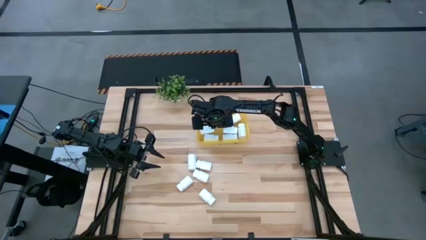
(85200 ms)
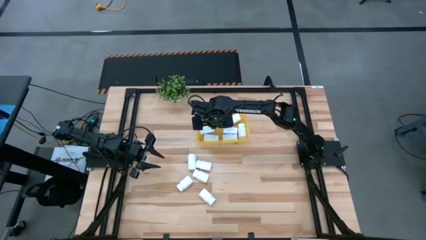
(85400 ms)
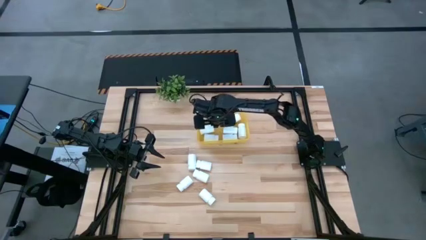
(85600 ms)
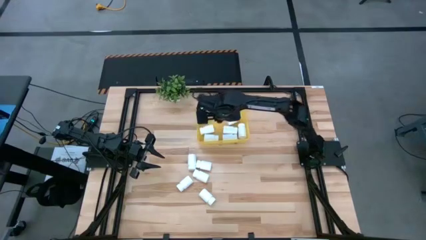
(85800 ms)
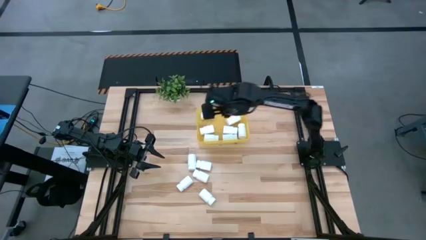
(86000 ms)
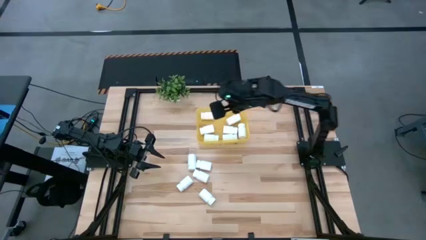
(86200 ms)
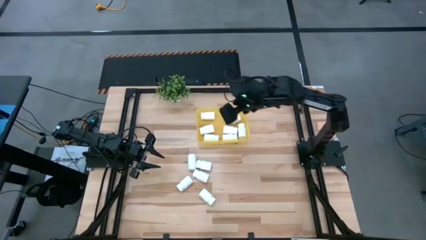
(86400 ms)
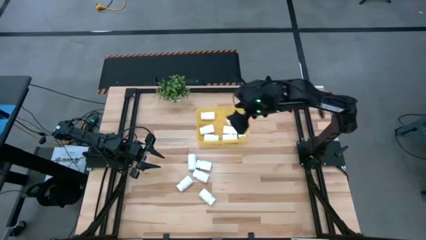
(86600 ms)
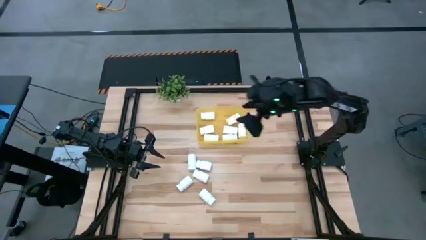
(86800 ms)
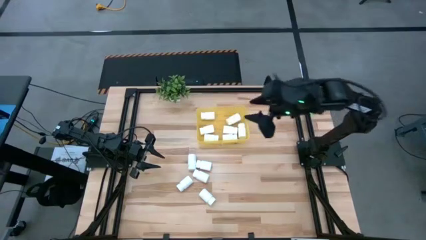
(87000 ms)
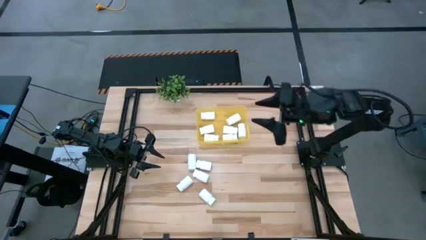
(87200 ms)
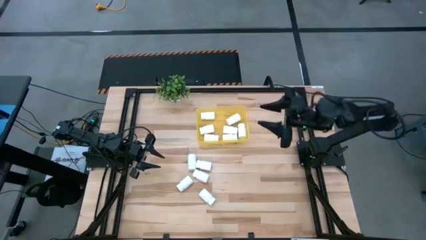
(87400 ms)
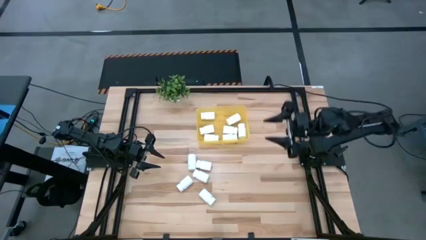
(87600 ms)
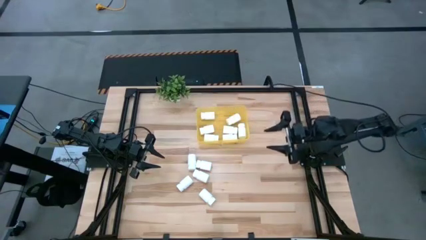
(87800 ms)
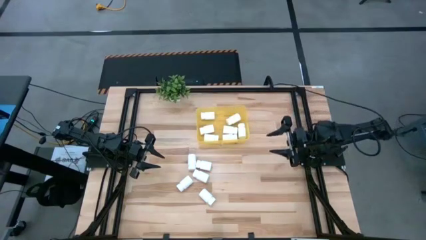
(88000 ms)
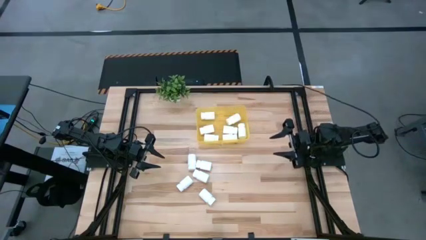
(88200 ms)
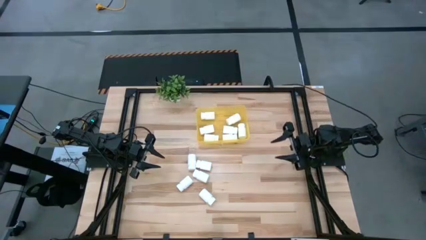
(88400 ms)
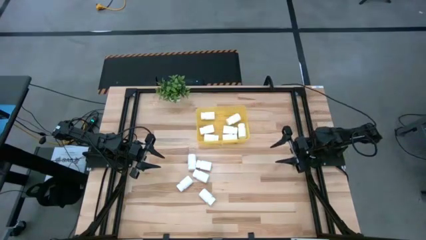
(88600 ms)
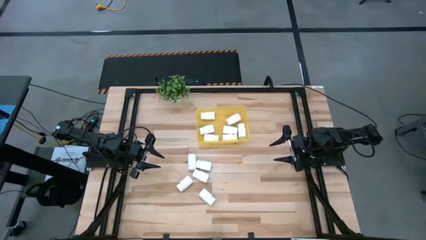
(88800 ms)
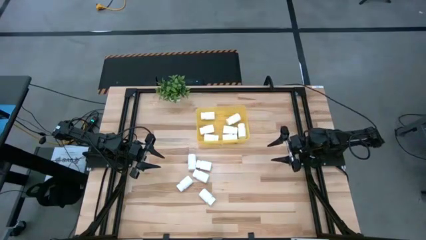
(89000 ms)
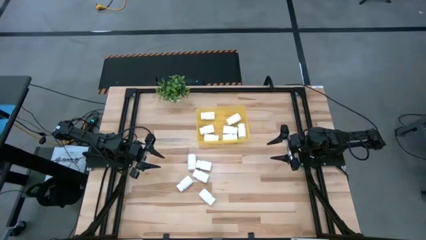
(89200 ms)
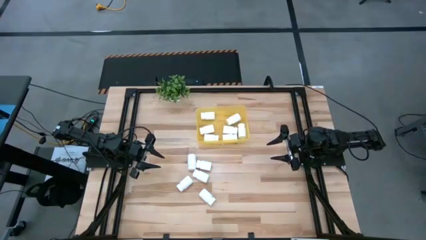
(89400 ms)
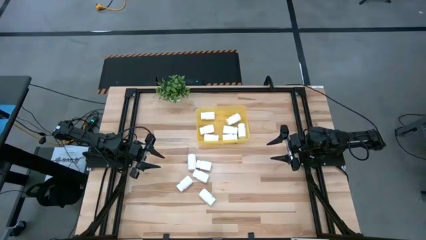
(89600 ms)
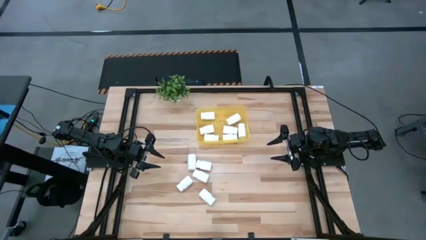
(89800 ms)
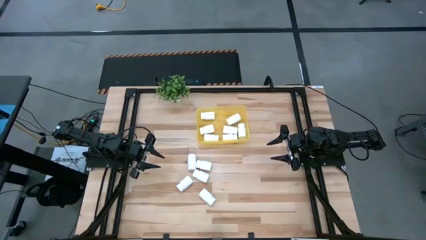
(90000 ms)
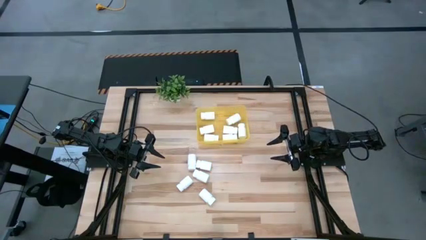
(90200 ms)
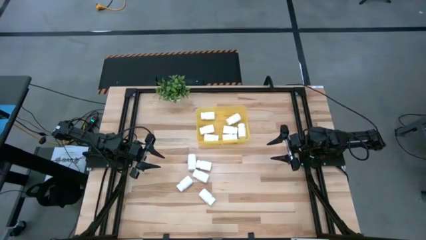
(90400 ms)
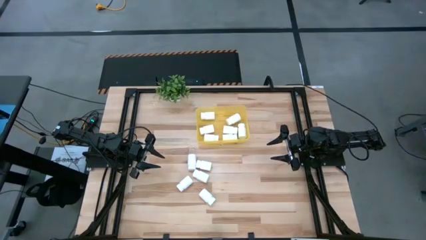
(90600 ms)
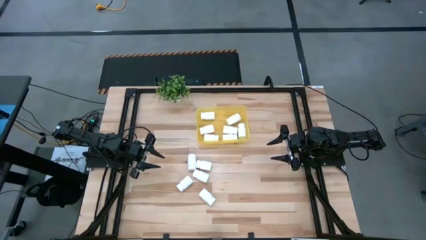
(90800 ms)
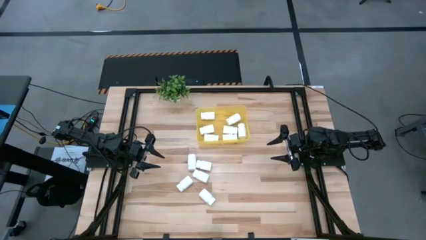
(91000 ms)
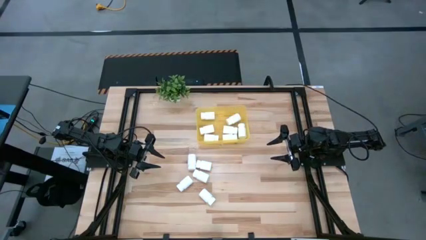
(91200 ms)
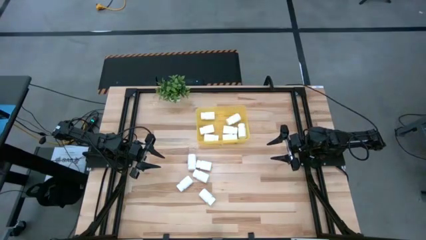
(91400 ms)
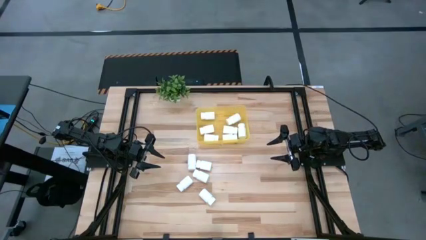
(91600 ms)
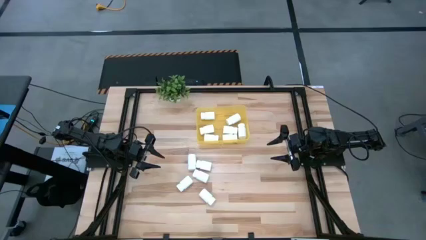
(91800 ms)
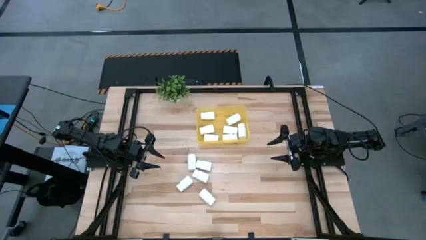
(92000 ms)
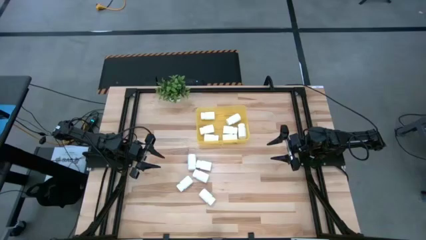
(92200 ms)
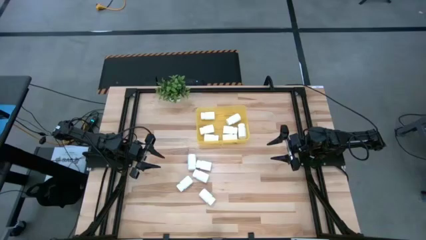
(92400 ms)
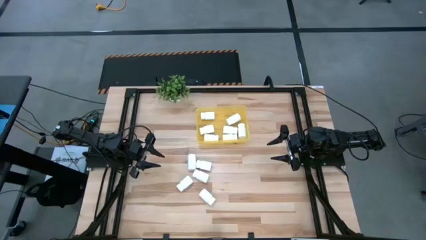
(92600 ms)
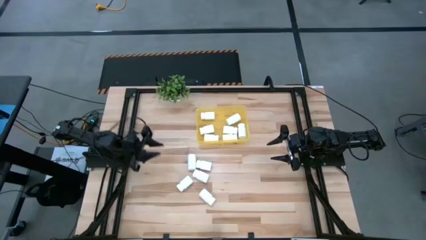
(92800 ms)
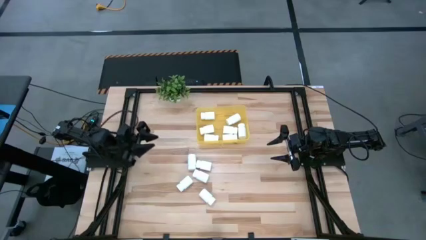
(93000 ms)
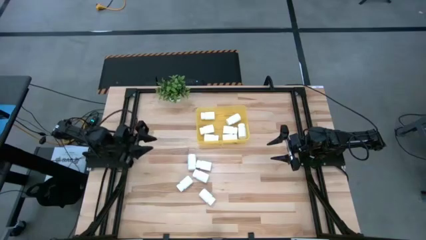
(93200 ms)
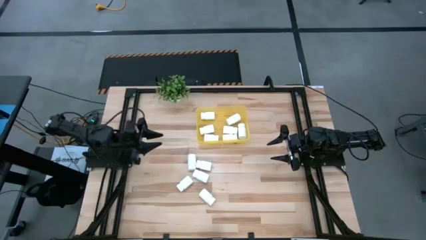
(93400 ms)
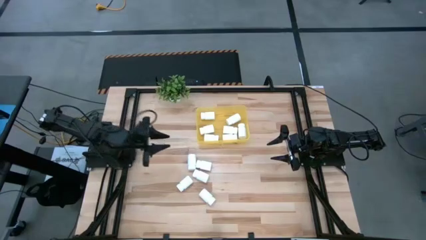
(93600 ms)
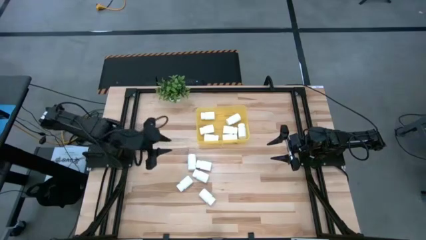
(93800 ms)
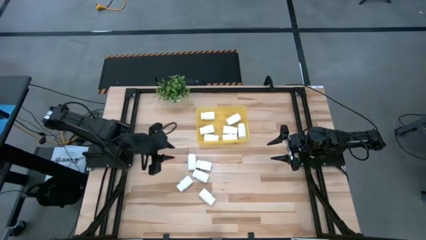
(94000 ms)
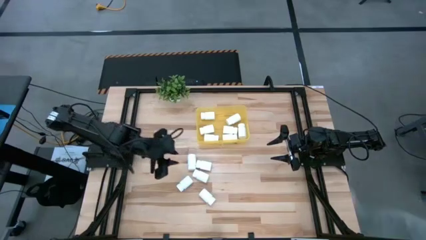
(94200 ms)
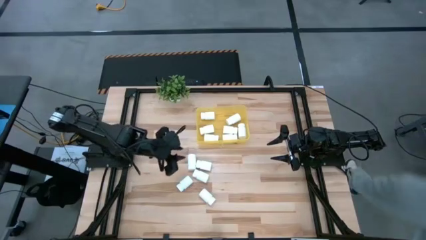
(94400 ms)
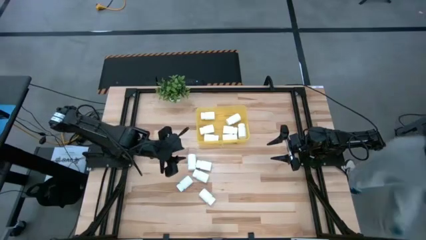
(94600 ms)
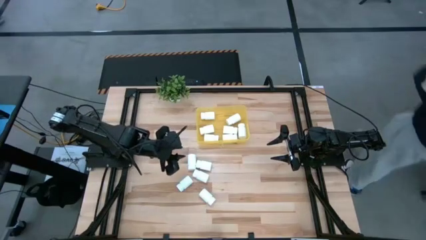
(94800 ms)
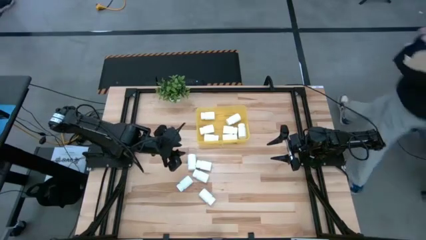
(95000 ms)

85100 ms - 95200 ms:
Task: Pick and place pill bottles into a basket
Put the white pill bottle into the yellow bin

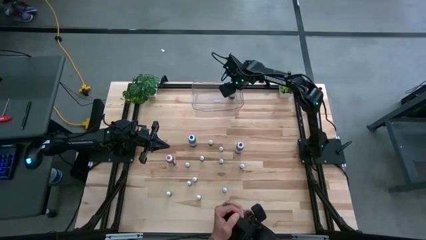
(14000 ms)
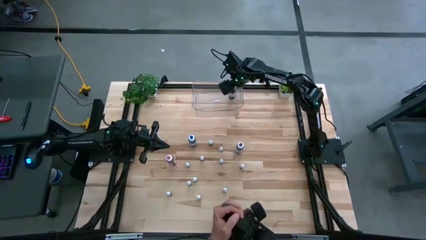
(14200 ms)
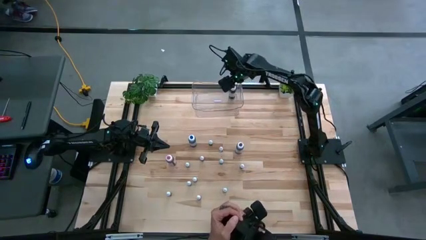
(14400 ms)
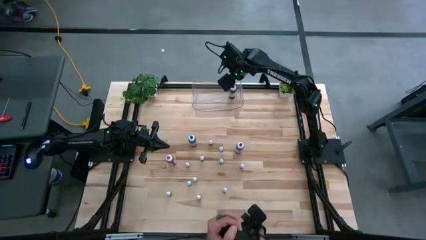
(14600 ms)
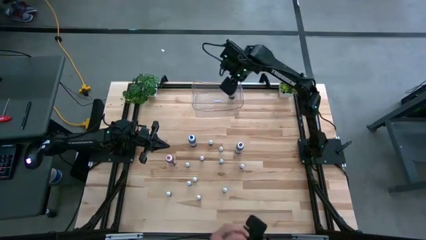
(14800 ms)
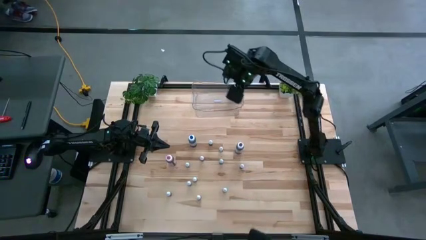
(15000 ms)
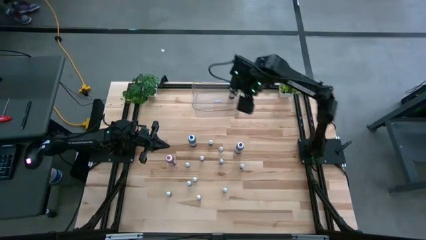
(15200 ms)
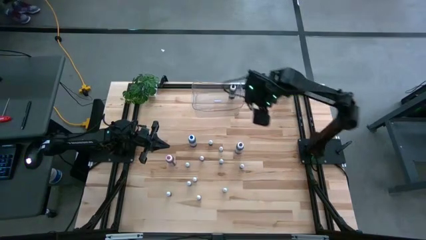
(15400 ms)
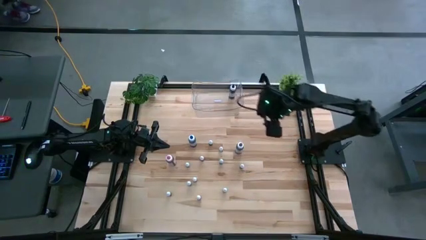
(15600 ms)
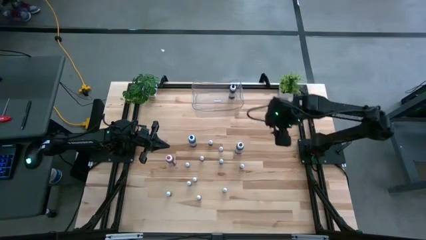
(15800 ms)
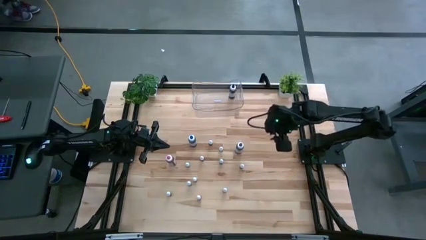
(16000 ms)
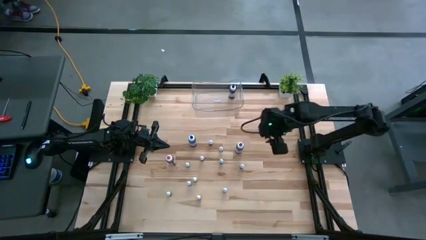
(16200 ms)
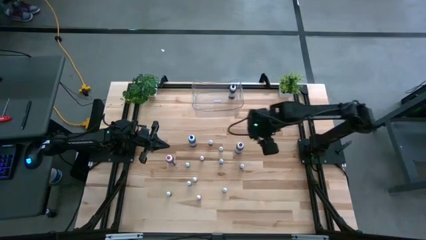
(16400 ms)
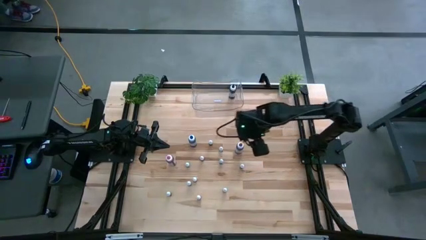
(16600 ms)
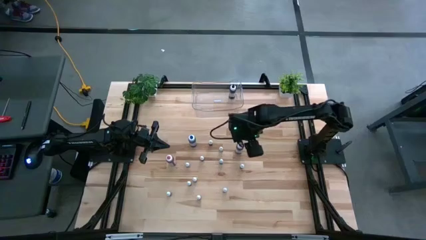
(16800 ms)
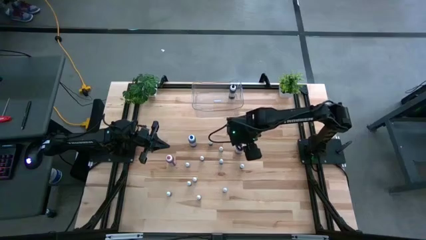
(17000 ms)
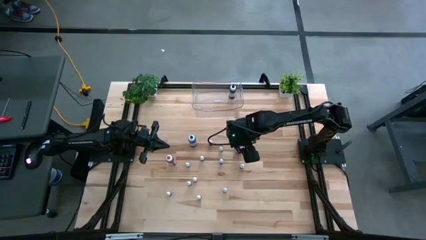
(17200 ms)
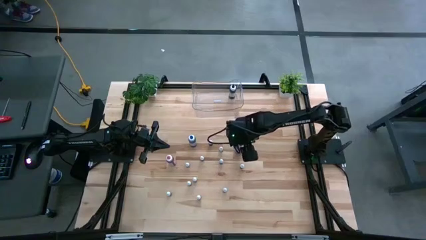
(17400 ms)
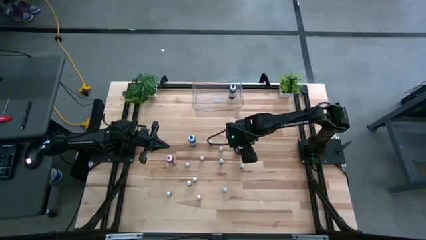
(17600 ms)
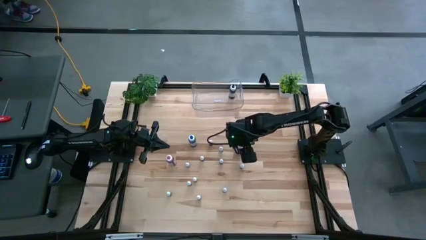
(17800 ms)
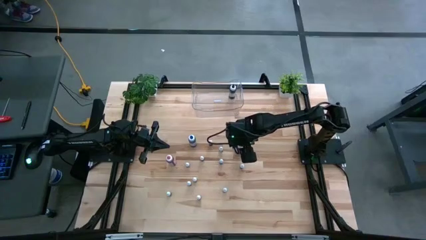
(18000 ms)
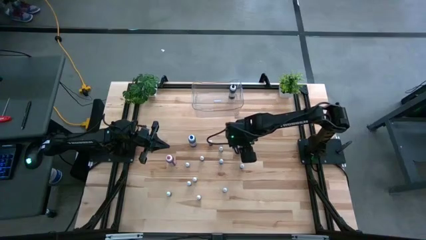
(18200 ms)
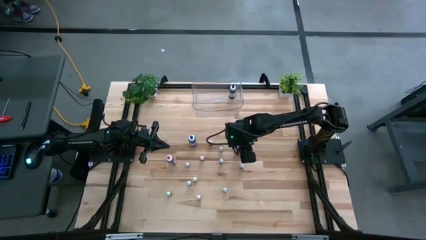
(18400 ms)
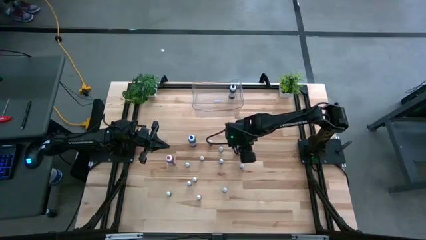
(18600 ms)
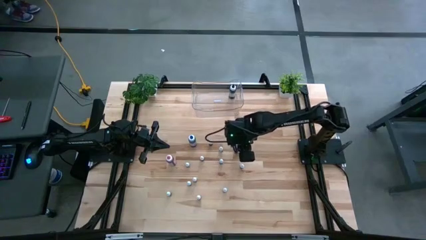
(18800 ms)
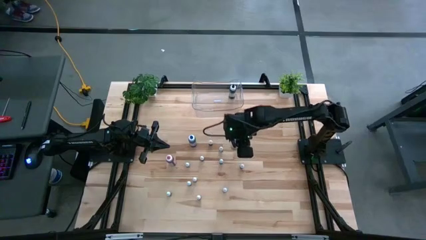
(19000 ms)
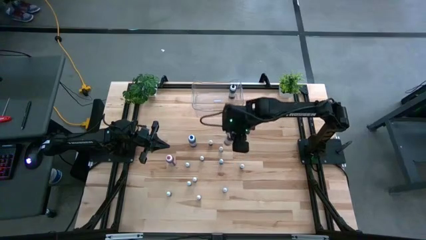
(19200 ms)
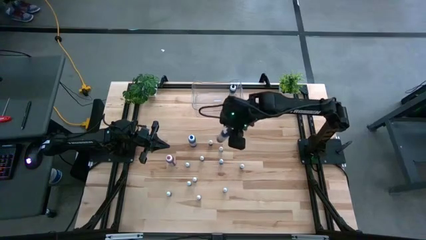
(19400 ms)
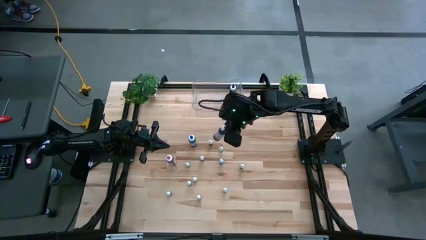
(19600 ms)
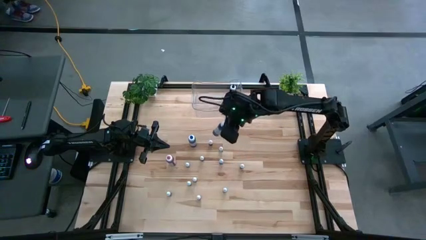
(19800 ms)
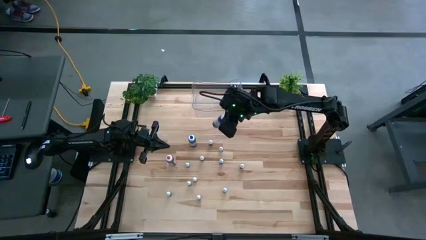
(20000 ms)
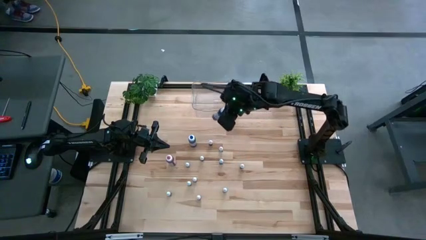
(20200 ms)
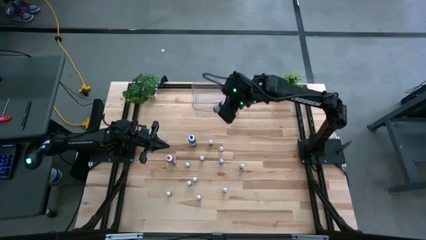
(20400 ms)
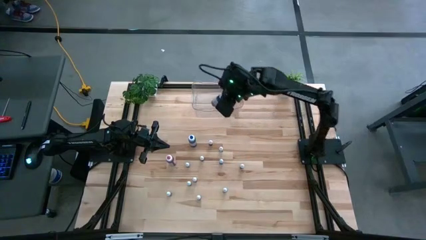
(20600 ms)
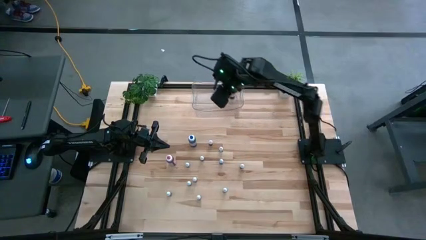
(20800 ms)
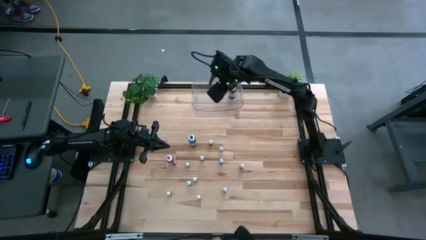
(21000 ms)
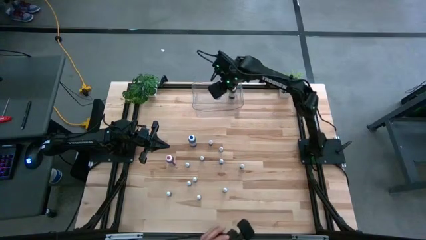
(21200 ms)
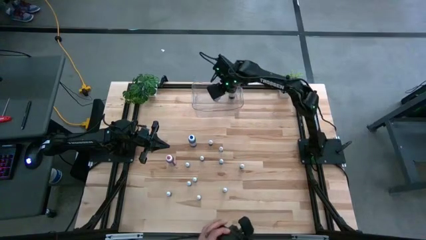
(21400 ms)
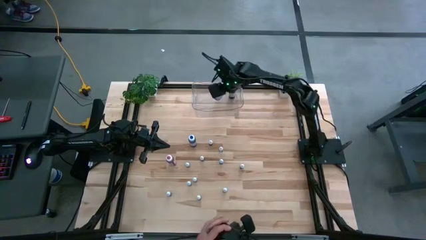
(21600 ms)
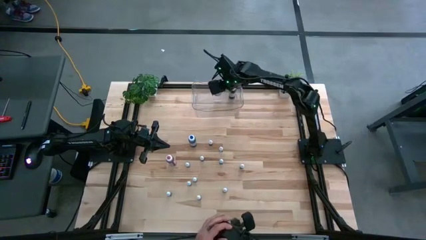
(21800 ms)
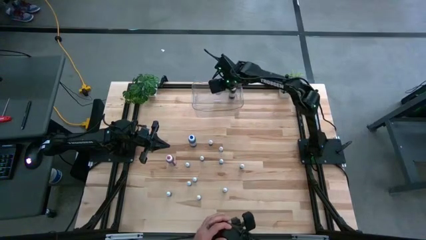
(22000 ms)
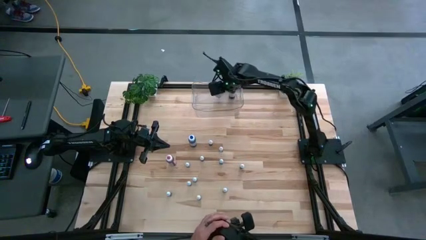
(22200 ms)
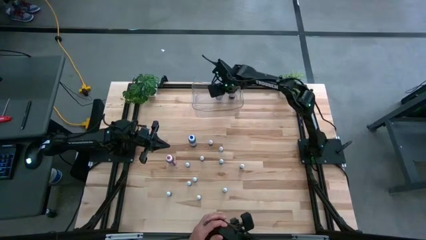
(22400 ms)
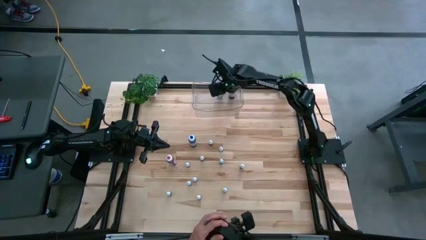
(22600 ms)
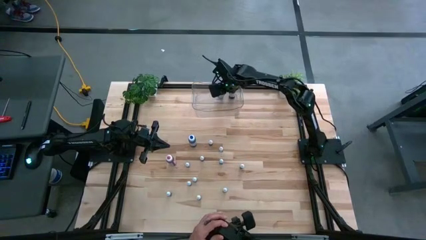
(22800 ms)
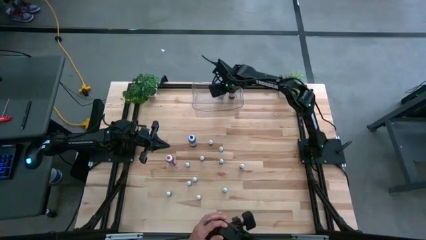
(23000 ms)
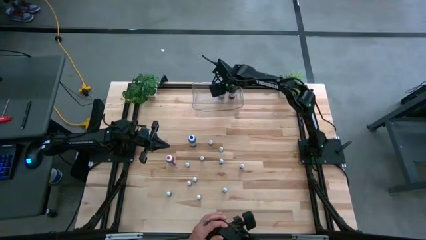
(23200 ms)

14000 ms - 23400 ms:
Task: Pick & Place food coloring
Put the large purple food coloring bottle into the transparent bin
